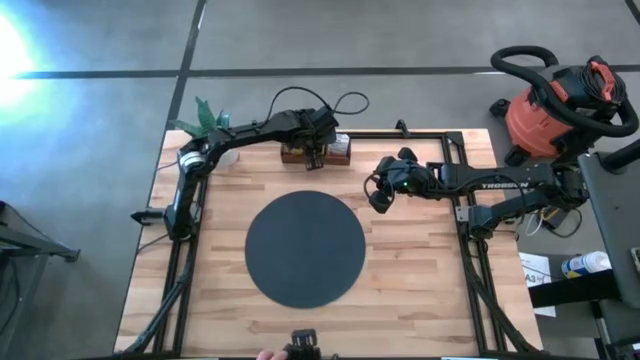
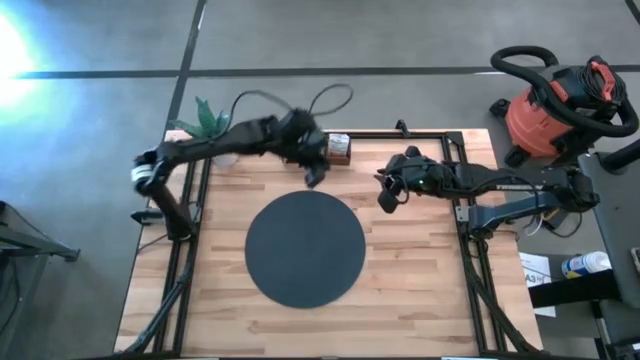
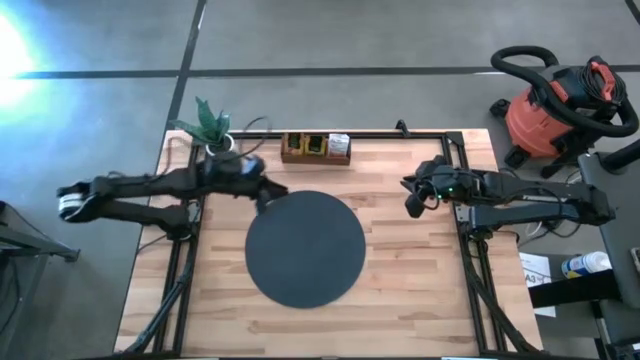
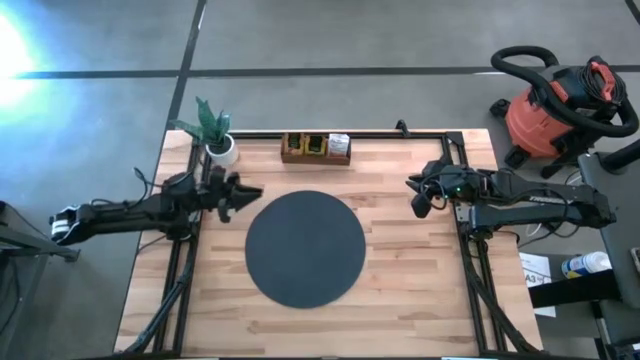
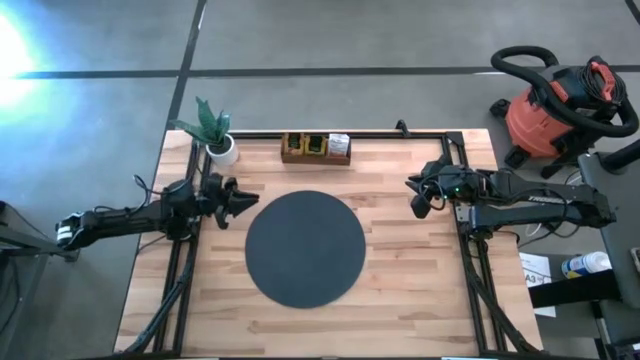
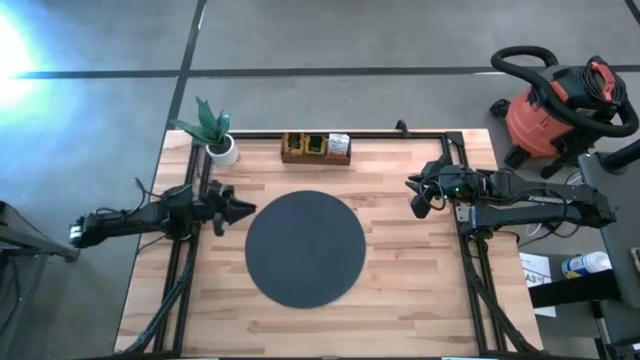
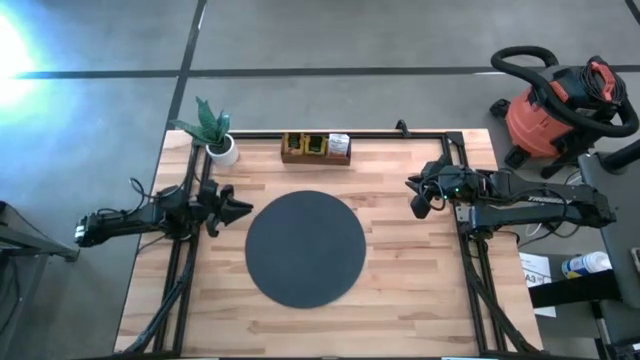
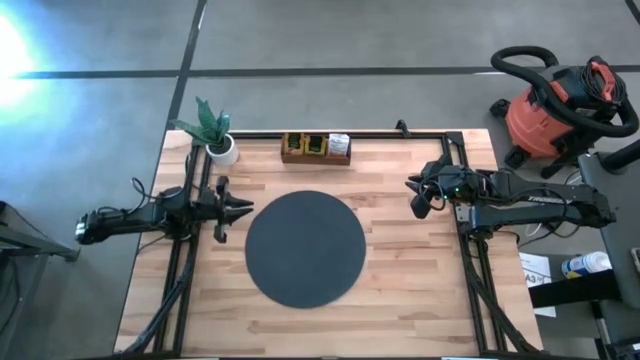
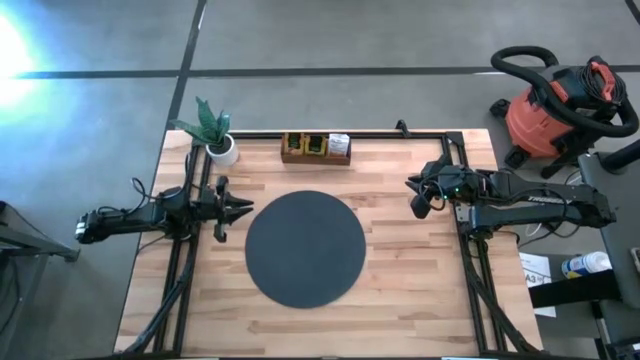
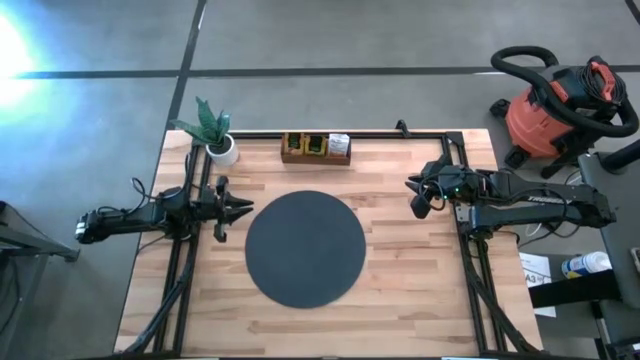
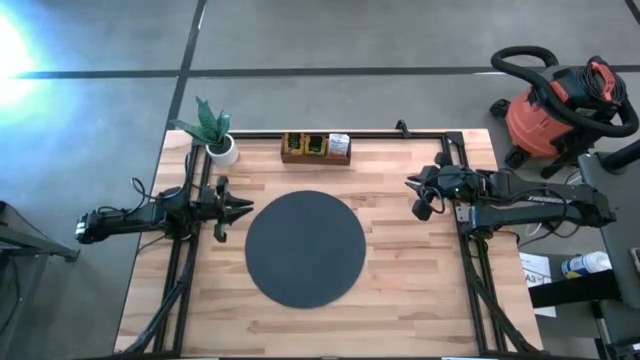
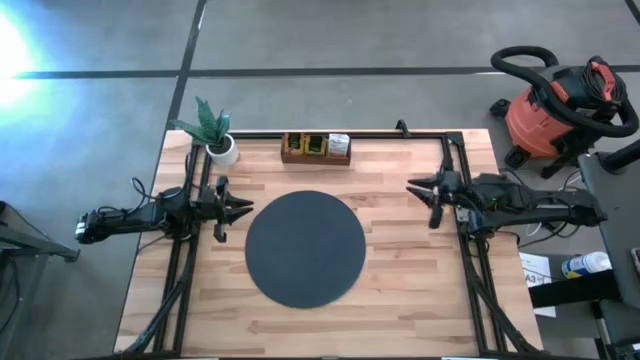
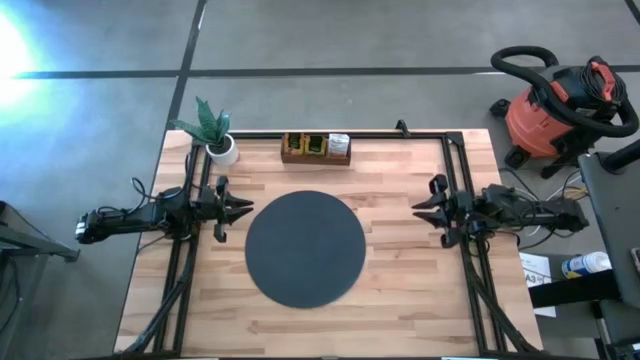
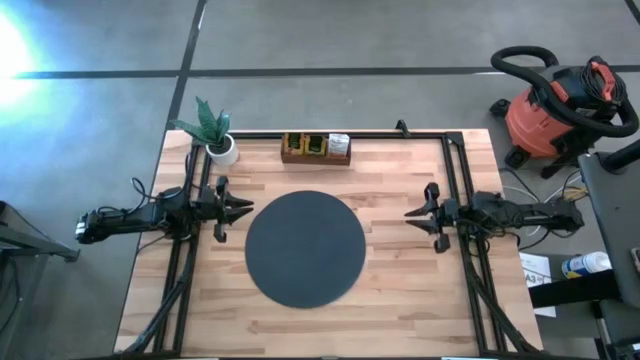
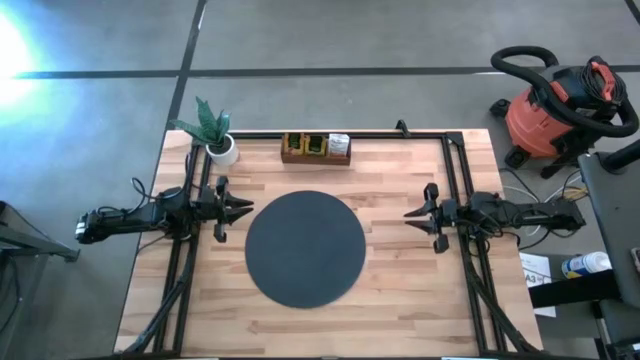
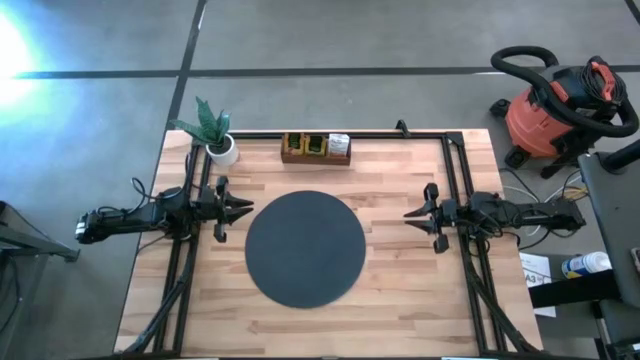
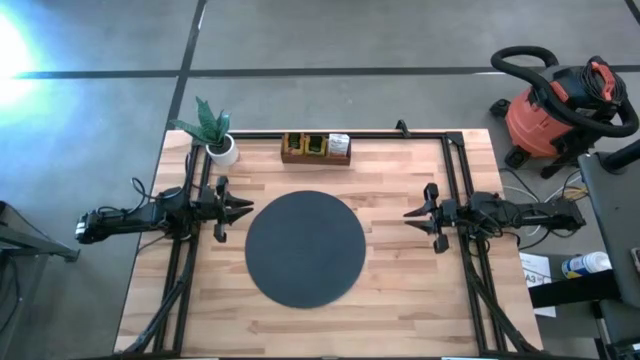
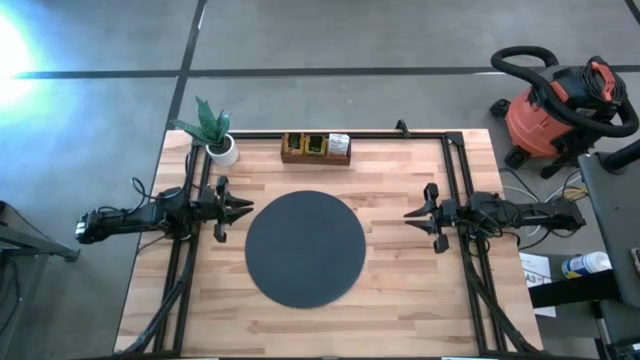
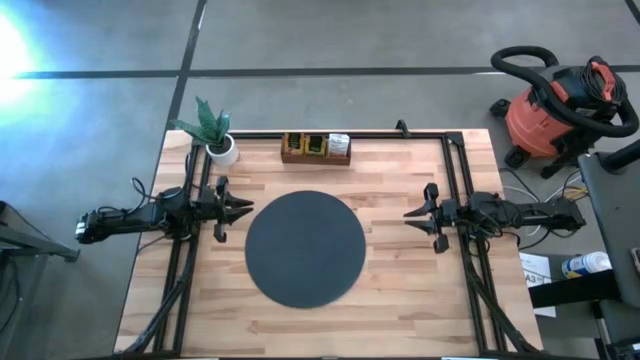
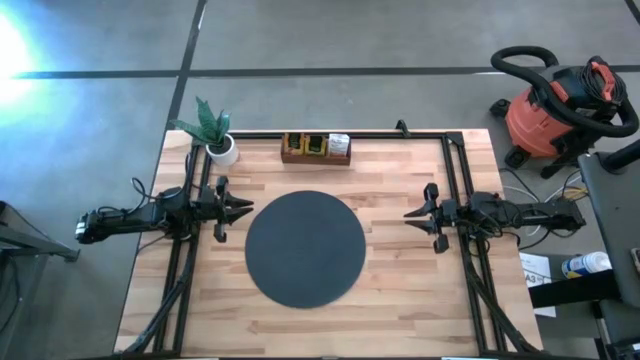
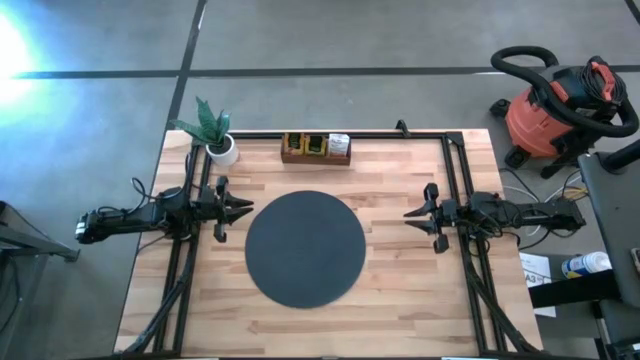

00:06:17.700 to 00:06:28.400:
Task: Pick & Place Tea
Return to Home Position

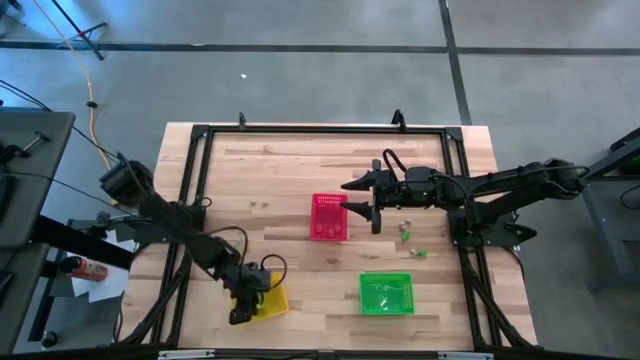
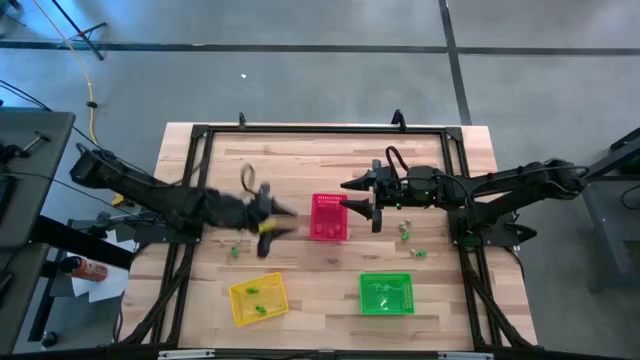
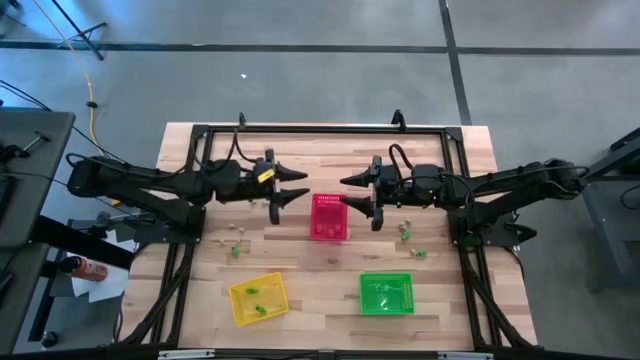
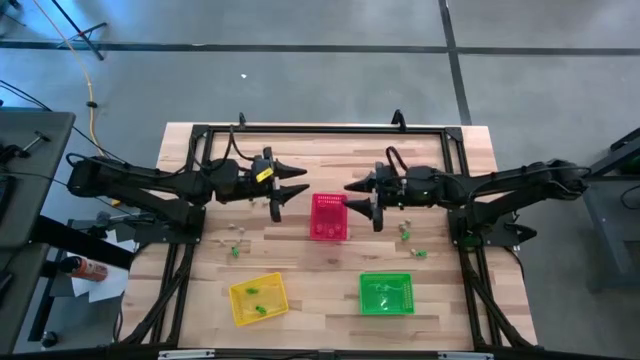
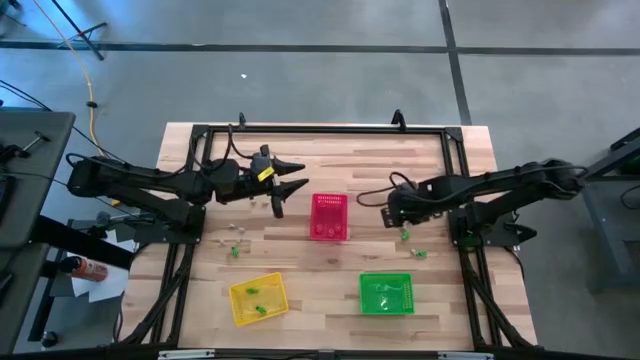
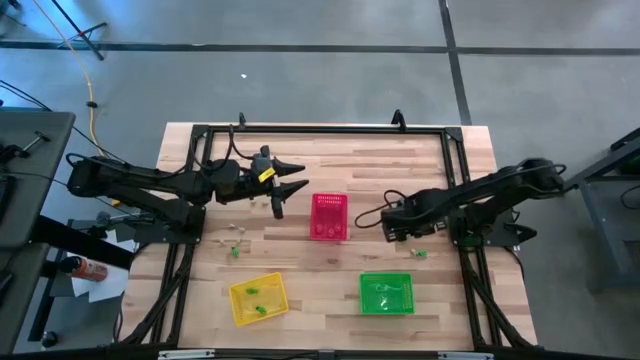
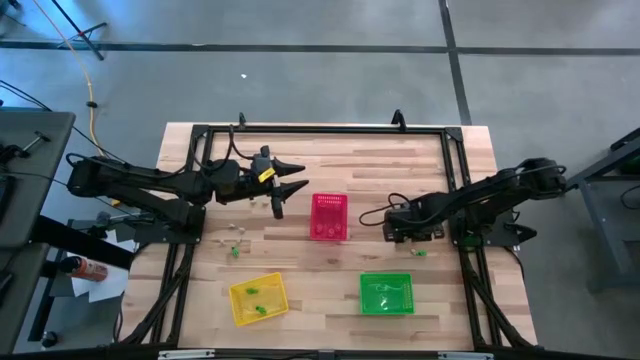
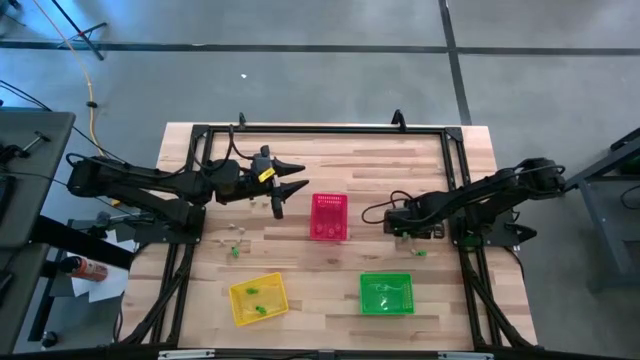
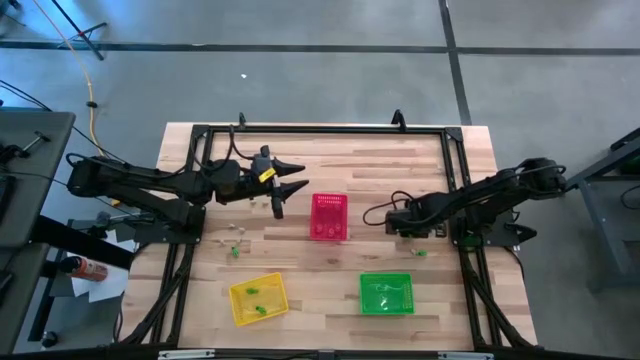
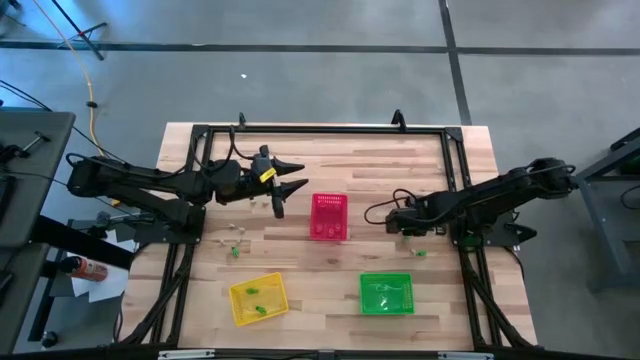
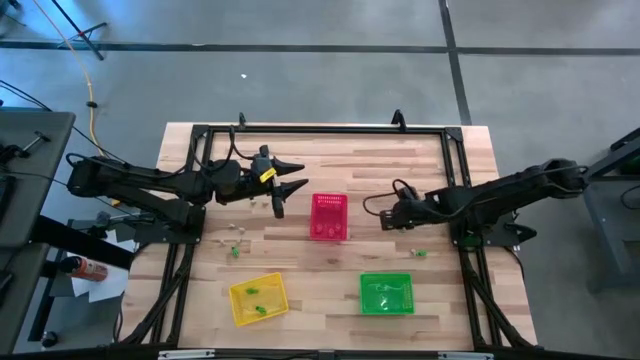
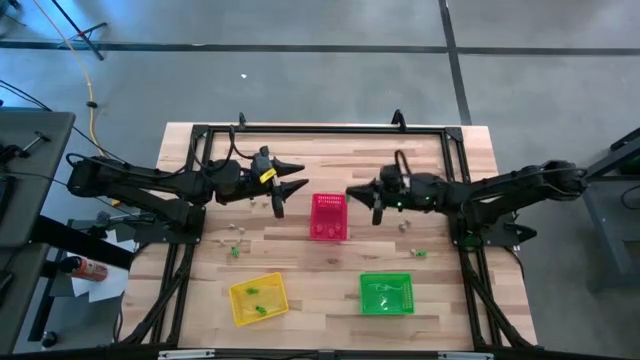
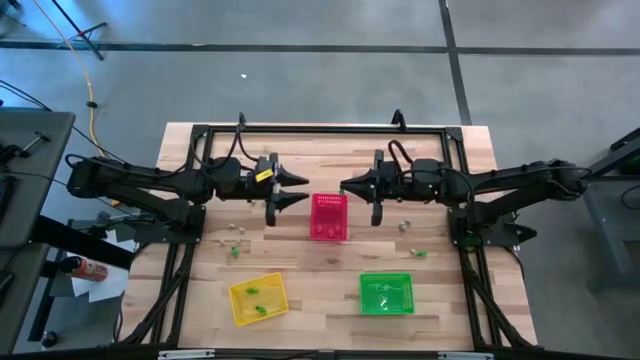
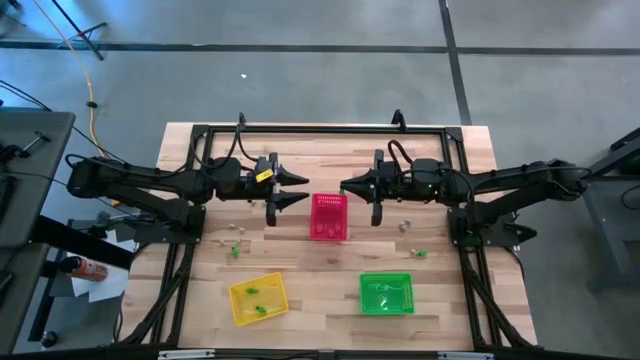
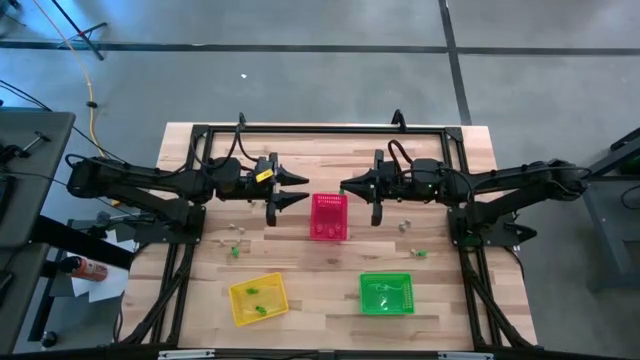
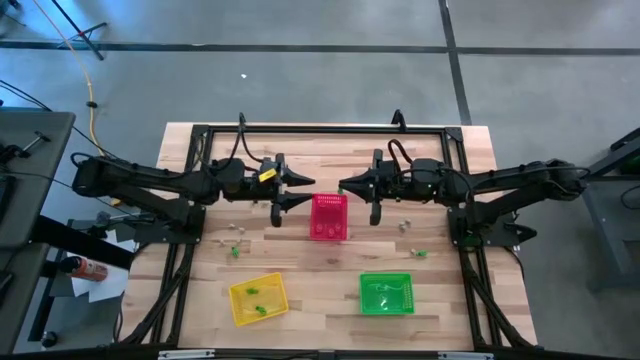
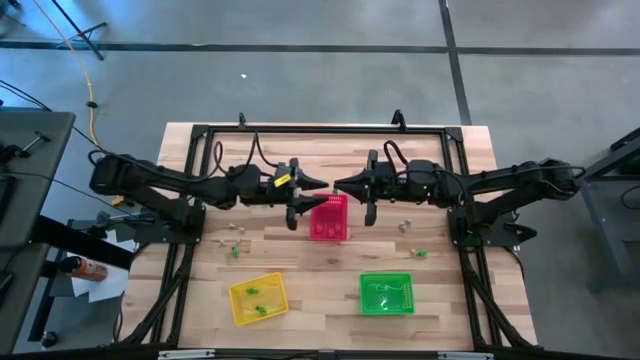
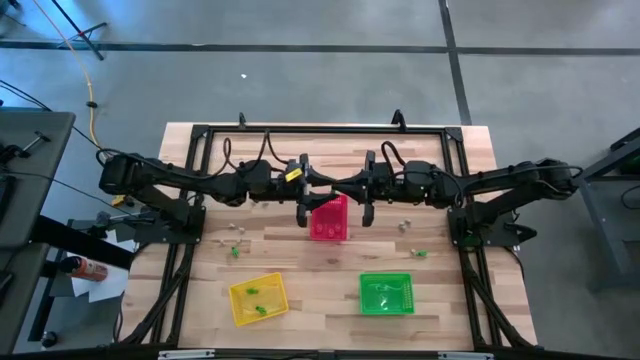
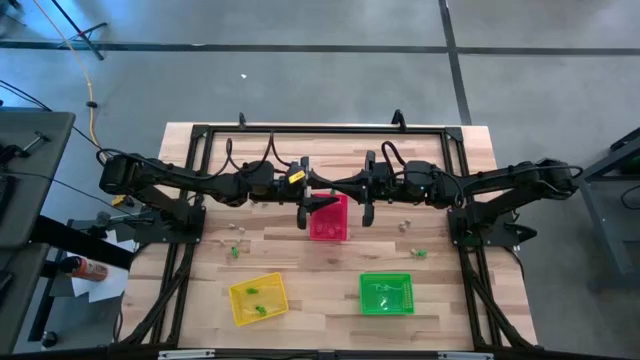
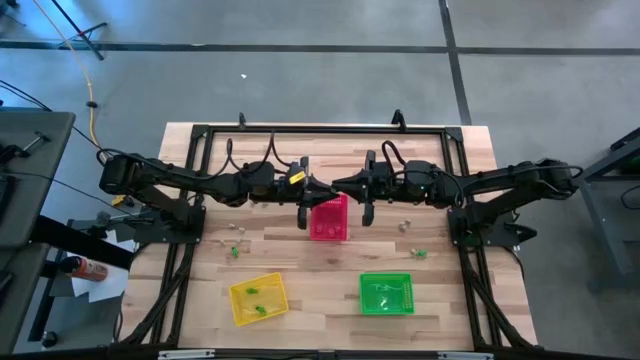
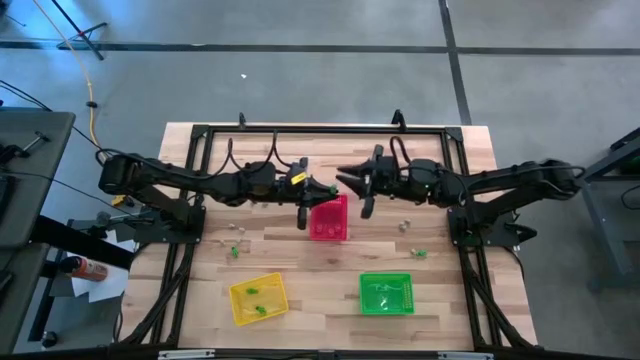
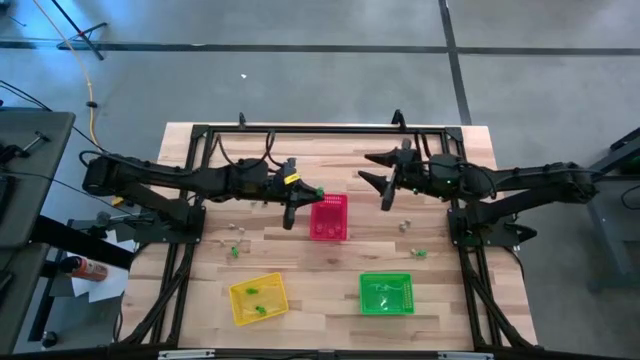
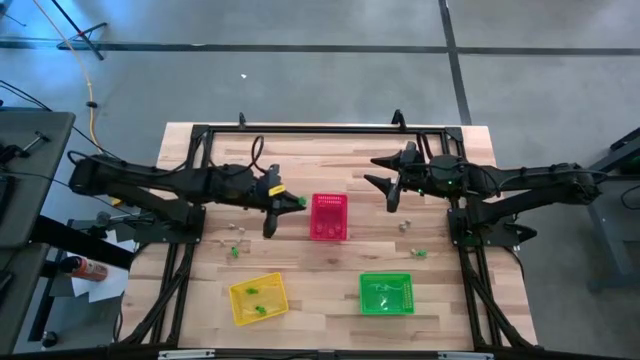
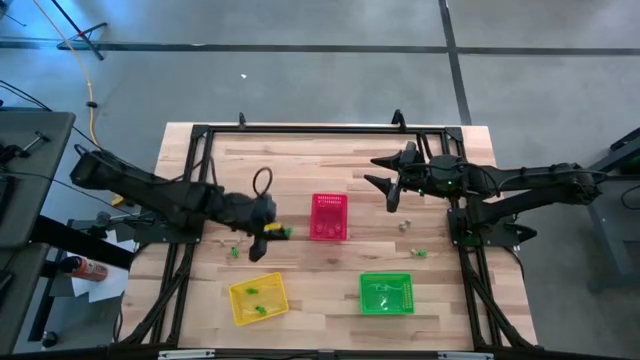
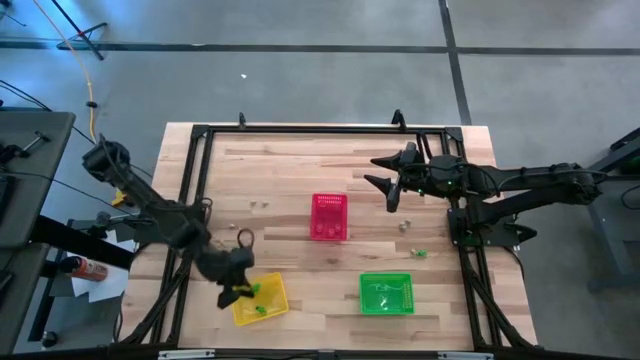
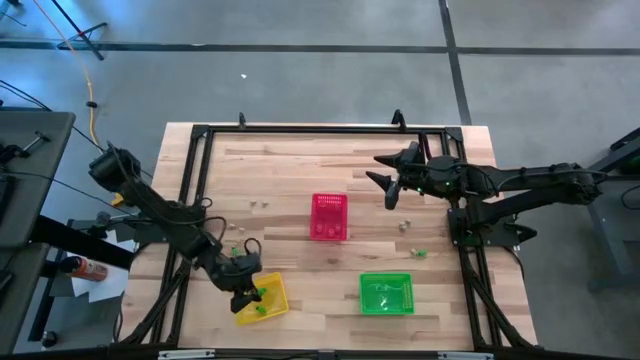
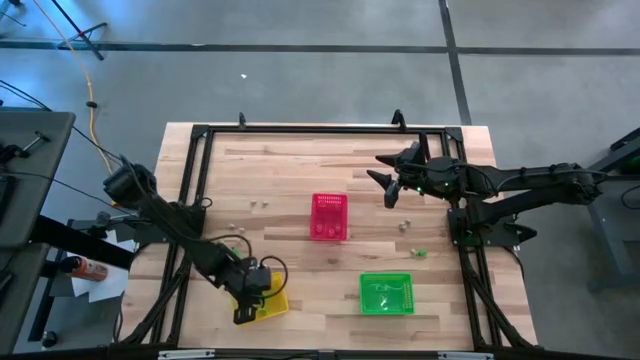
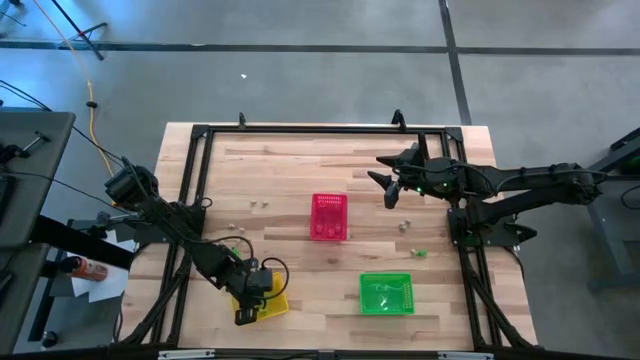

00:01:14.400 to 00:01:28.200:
Task: Sort Halloween decoration
Put the top right green skeleton toy into the yellow bin
